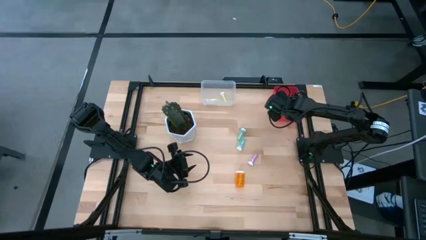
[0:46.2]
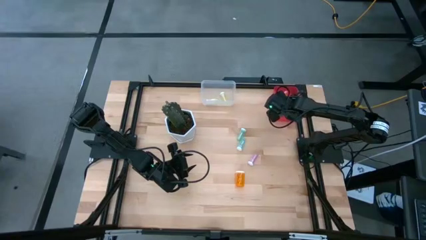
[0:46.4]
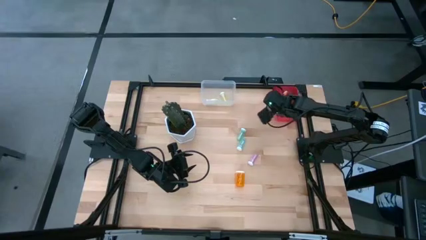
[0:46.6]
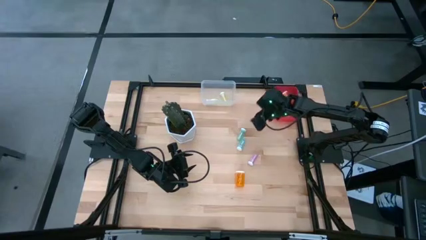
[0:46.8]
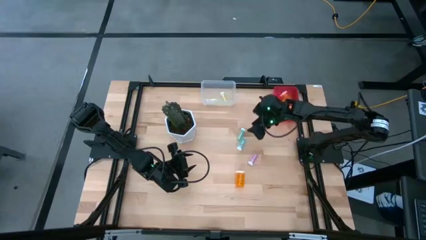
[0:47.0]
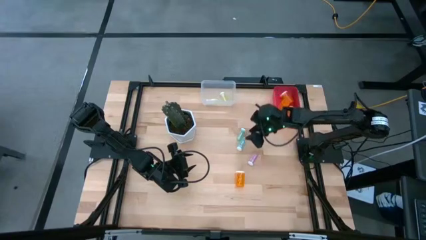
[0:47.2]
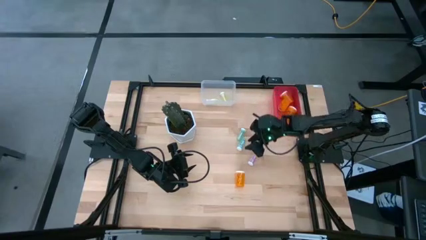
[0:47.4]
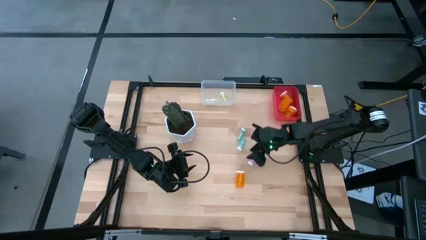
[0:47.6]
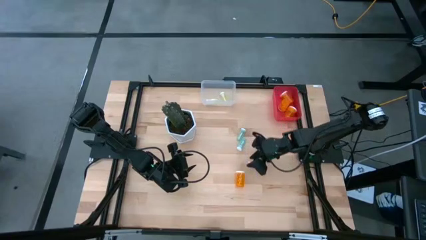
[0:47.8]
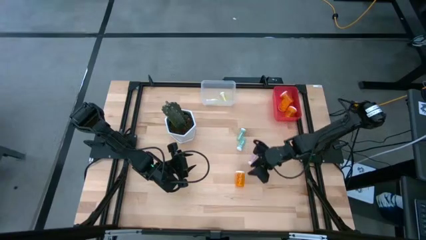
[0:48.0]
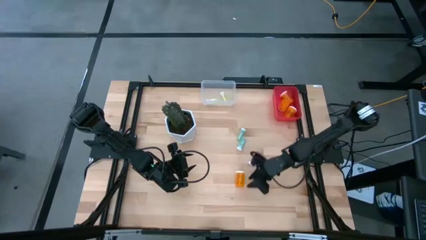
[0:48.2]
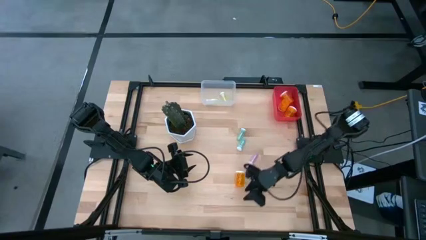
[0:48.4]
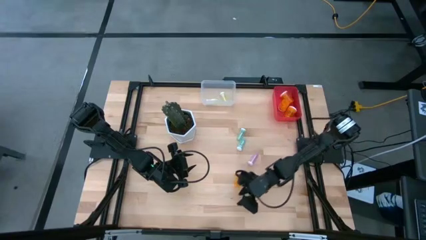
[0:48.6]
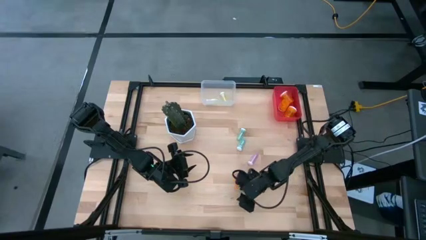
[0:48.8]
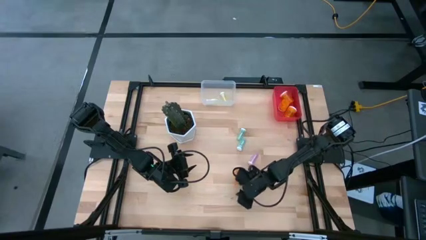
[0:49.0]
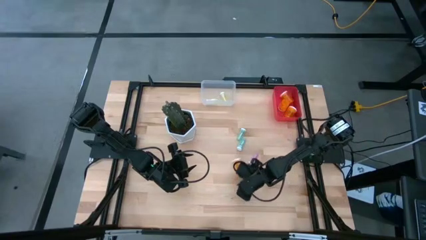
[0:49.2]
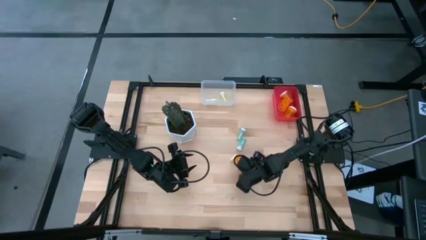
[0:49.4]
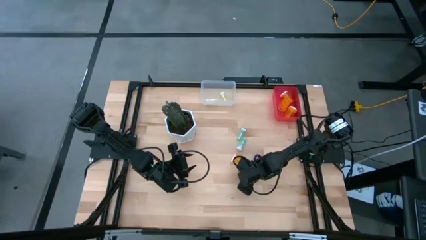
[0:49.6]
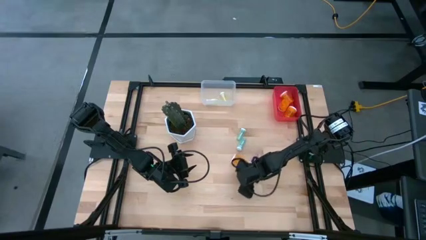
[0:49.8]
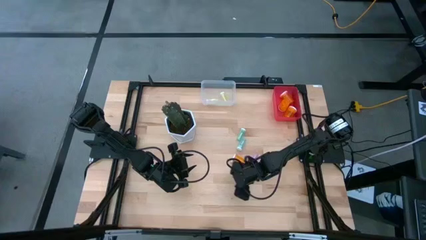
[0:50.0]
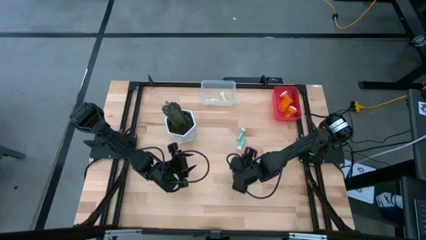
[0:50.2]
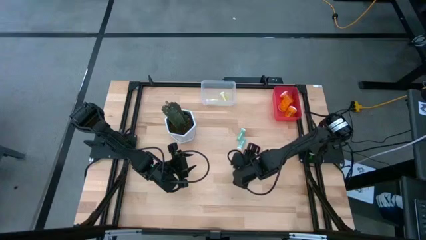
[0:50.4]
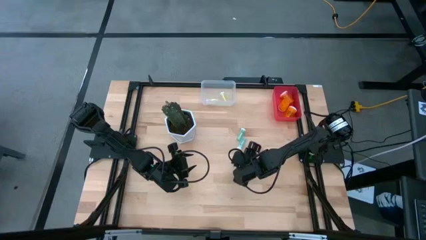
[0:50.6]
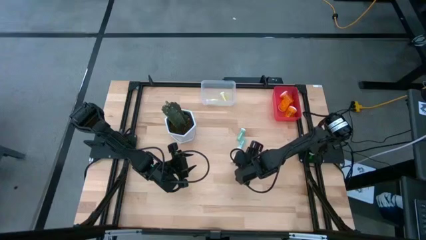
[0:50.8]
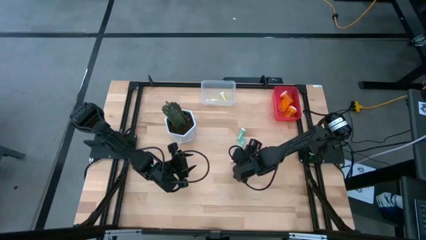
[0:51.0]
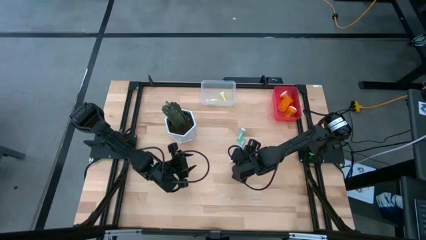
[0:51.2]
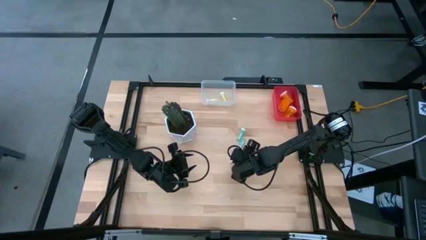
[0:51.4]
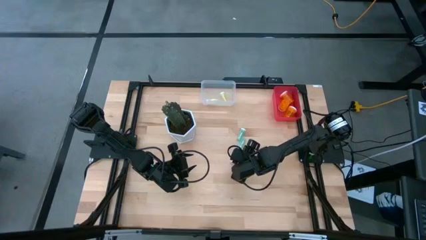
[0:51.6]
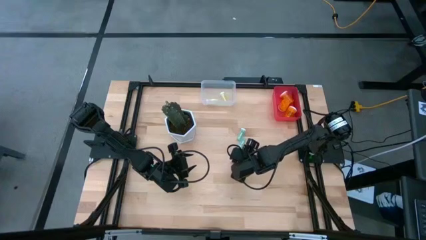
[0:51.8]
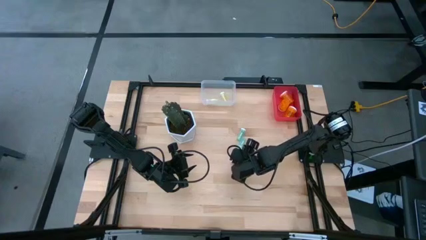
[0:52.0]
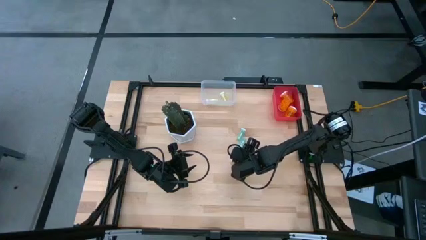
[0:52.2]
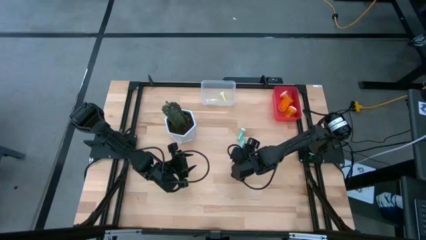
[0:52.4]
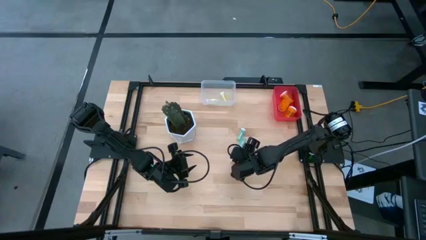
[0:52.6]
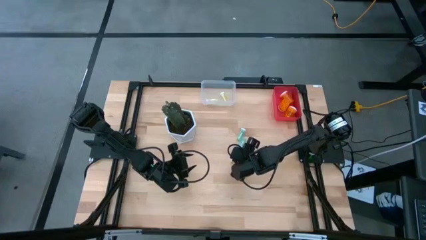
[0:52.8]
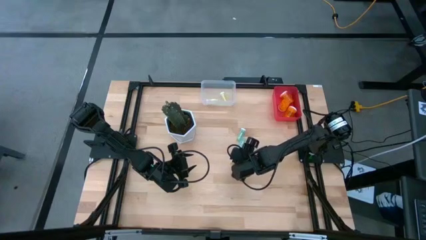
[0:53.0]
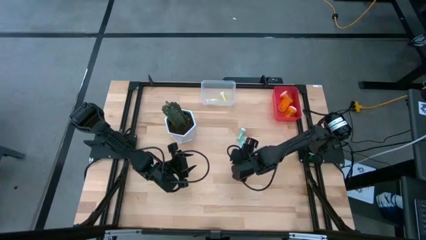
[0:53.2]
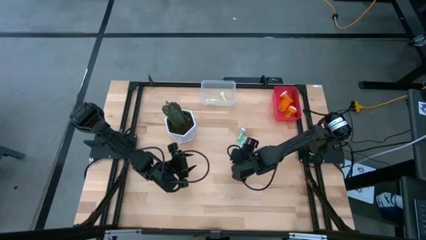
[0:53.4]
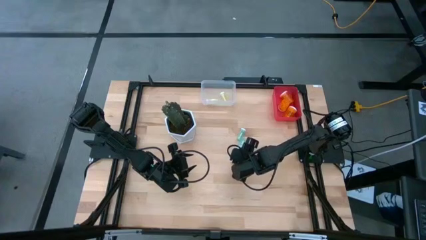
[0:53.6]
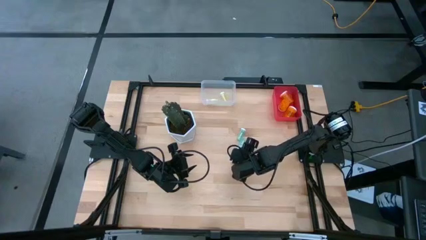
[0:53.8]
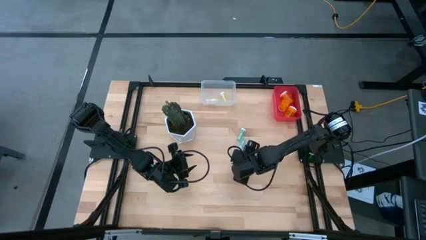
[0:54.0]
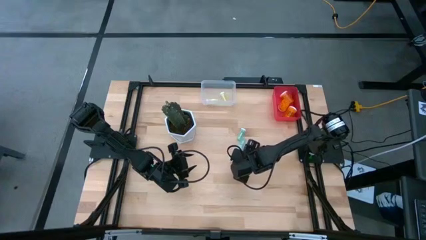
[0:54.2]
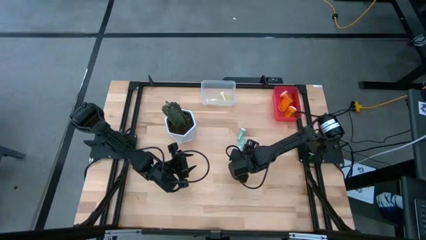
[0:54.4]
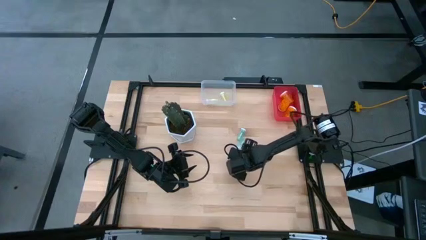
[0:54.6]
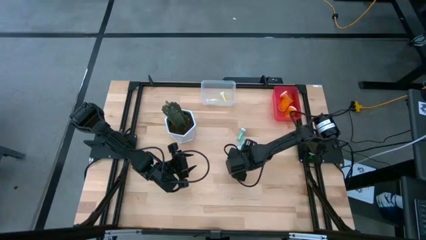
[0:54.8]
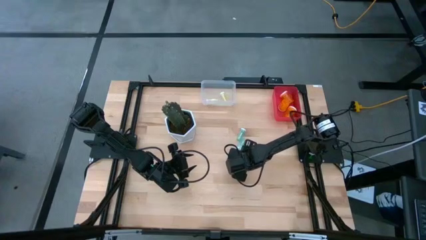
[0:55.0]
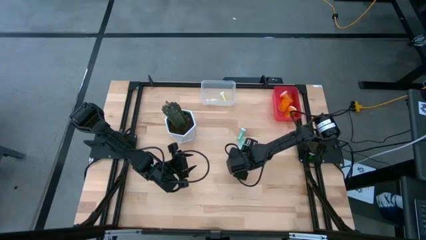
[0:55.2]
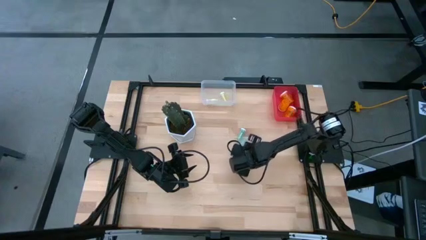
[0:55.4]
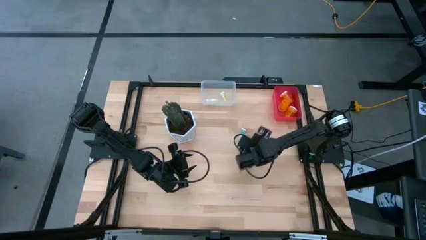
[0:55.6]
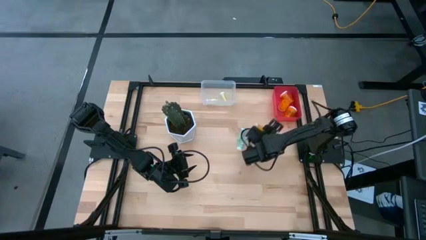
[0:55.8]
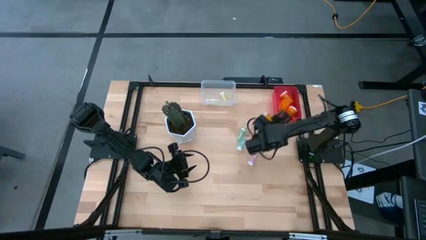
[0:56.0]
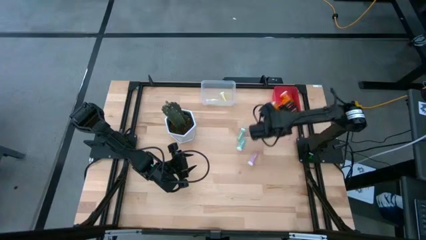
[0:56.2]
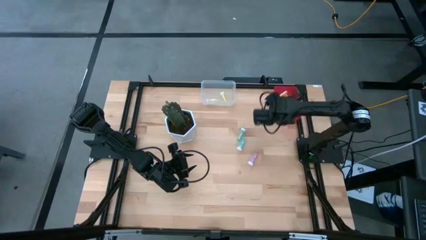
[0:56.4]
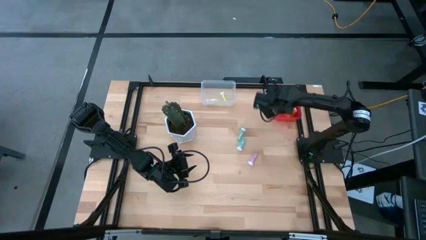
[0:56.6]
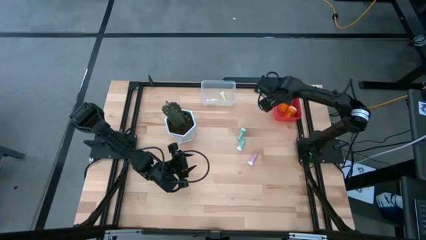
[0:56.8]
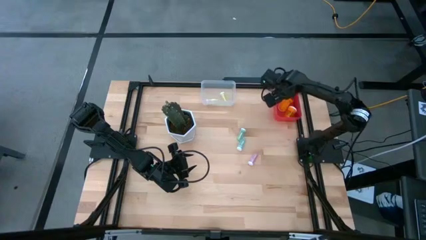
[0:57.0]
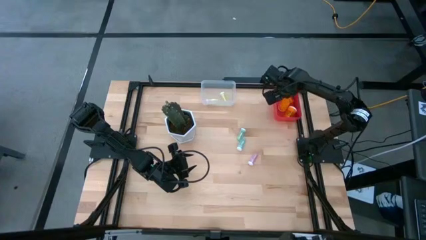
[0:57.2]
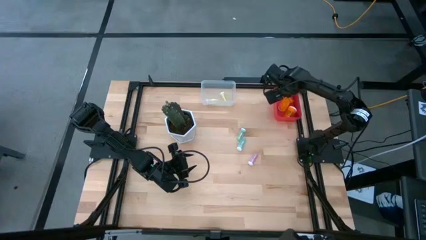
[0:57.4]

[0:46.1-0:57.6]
Task: Pick and place medicine bottles into bin by pill shape (circle, oval)
Put the large orange pill bottle into the red bin

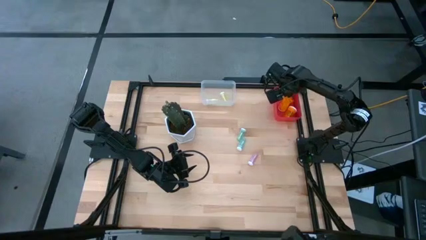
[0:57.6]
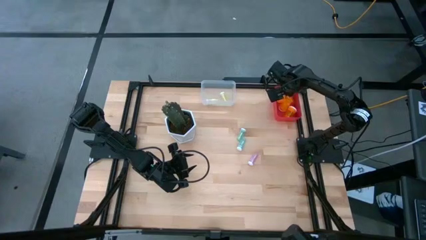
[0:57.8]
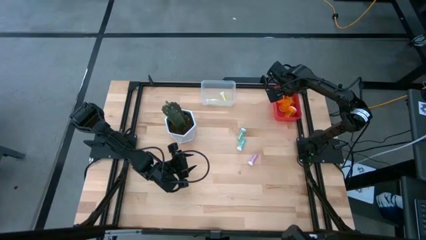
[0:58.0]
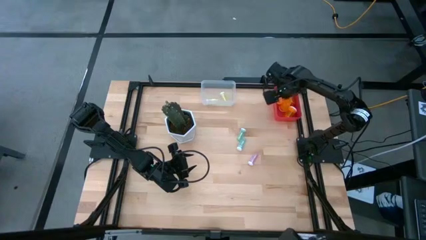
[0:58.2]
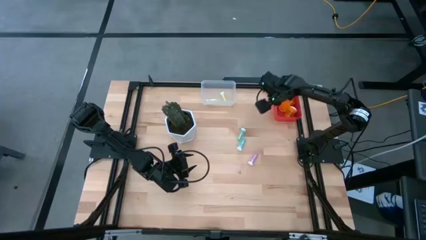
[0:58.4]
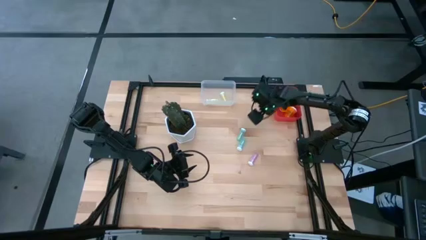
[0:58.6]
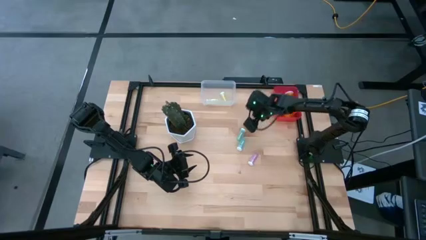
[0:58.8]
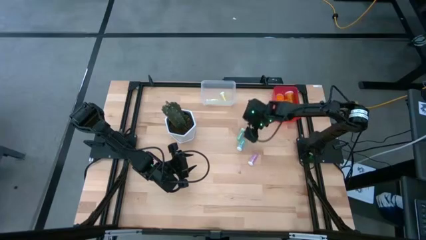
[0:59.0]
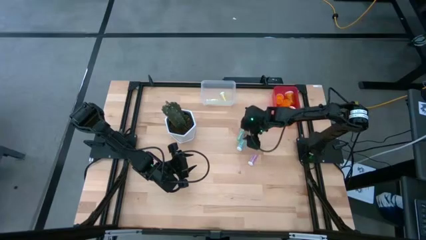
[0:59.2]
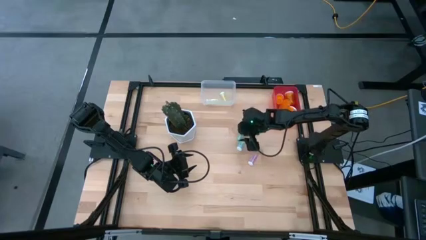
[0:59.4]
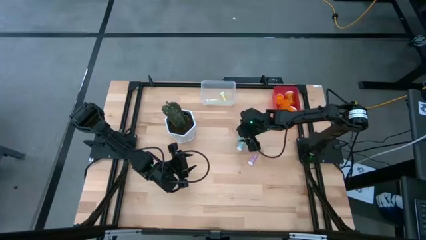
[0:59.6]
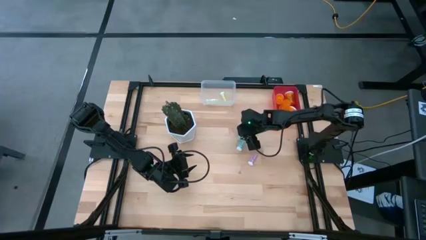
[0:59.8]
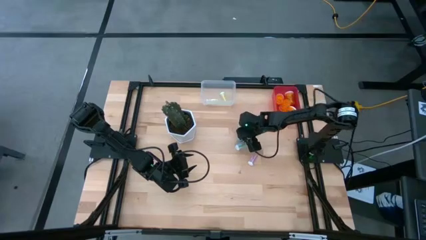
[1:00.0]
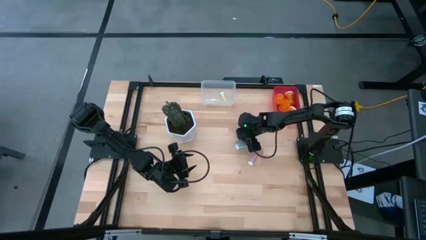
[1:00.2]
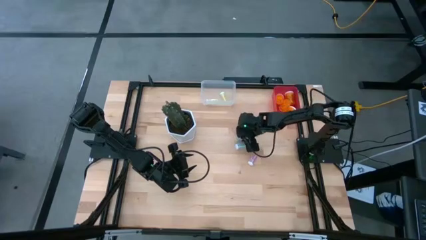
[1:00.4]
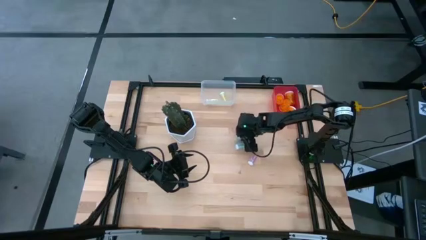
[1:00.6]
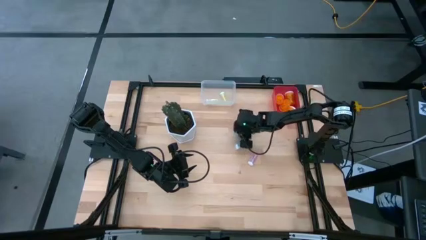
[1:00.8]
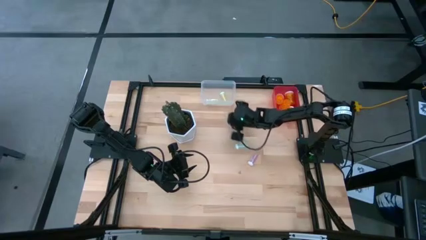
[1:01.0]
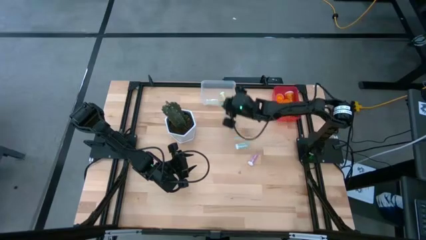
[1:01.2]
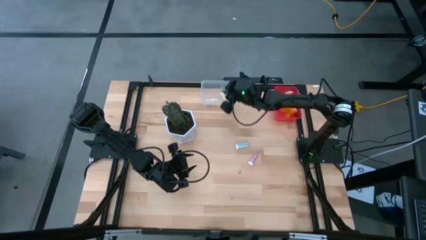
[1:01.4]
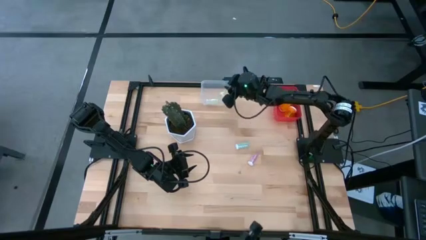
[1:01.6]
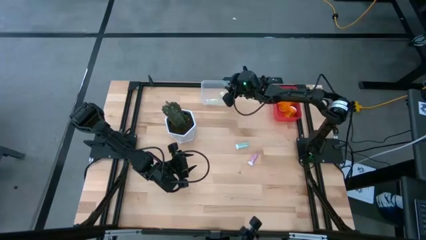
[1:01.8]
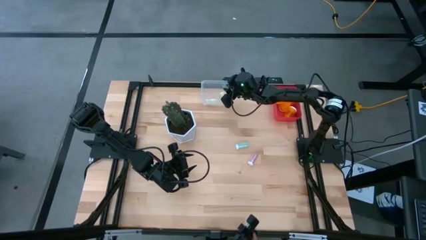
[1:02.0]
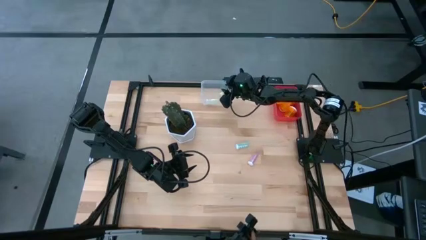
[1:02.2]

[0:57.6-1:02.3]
Put the small green pill bottle into the white bin
